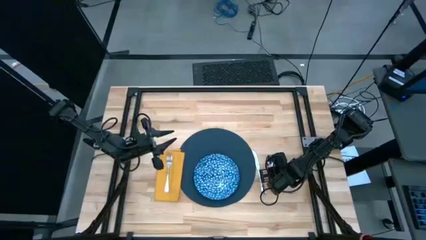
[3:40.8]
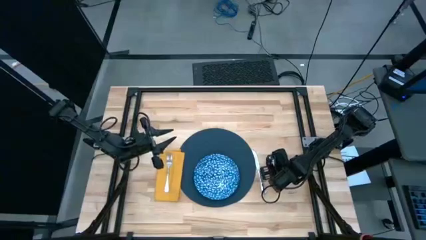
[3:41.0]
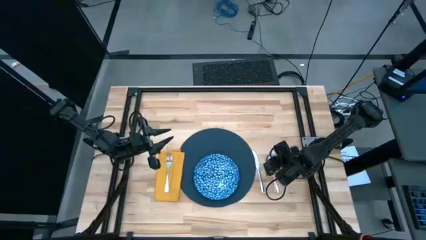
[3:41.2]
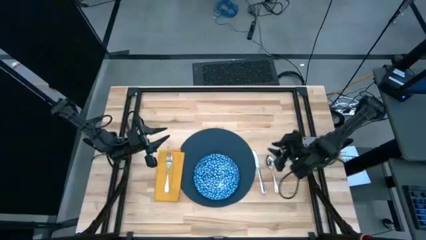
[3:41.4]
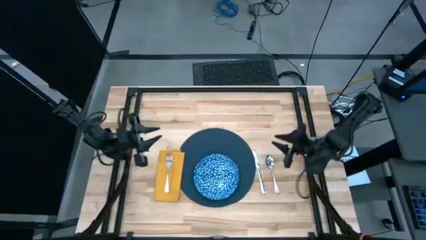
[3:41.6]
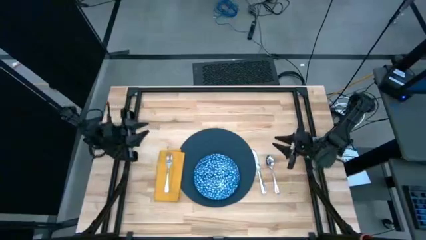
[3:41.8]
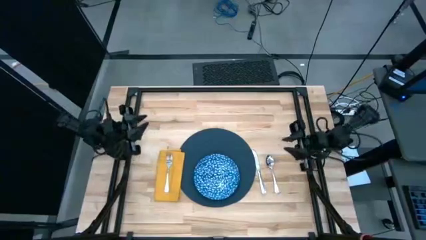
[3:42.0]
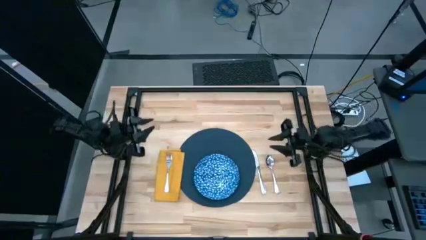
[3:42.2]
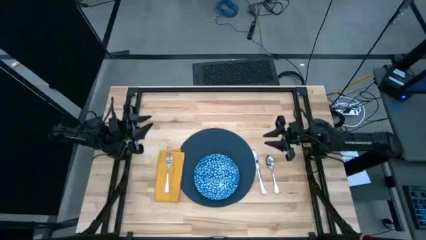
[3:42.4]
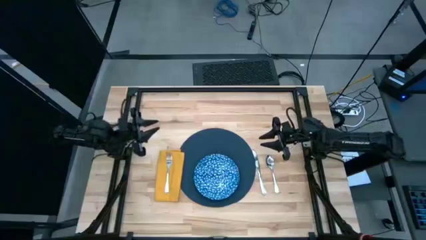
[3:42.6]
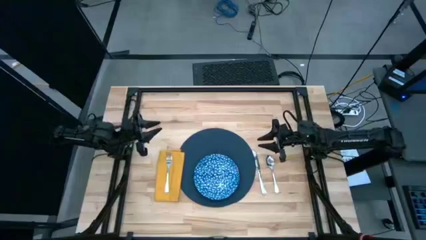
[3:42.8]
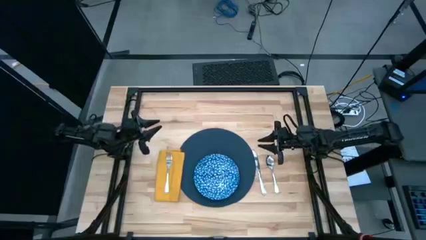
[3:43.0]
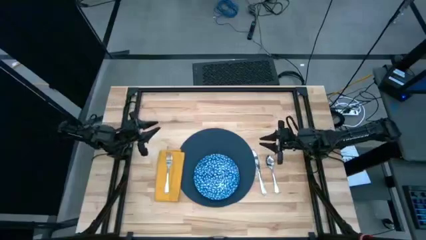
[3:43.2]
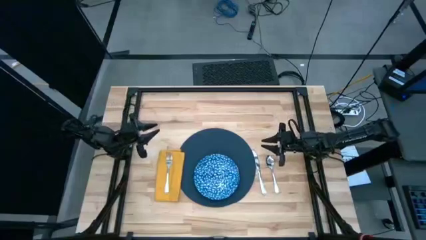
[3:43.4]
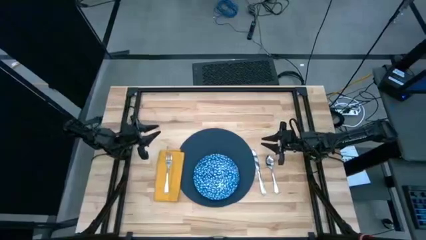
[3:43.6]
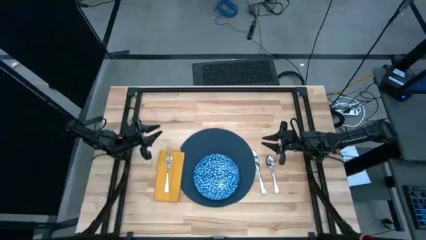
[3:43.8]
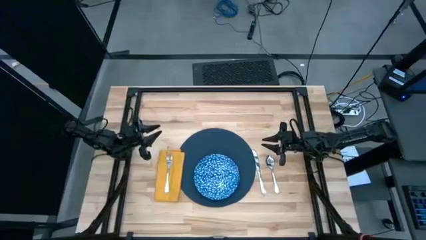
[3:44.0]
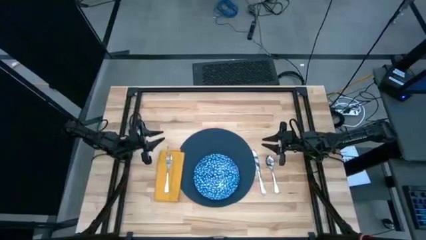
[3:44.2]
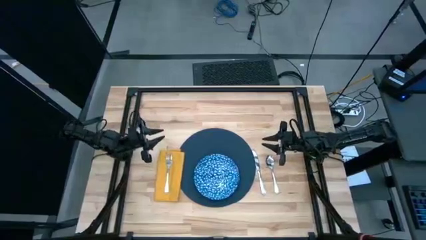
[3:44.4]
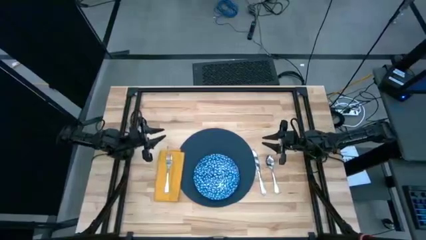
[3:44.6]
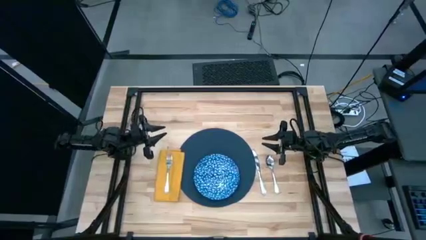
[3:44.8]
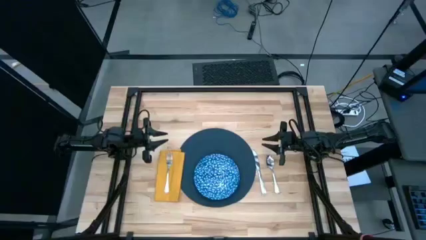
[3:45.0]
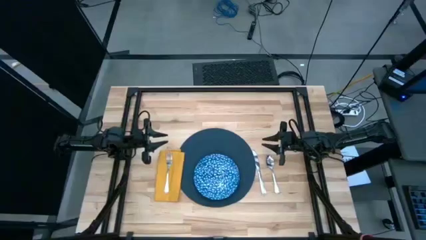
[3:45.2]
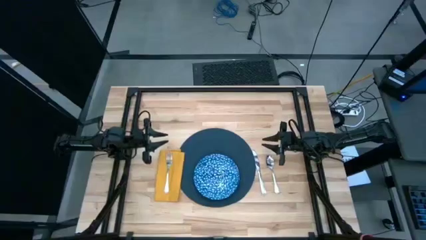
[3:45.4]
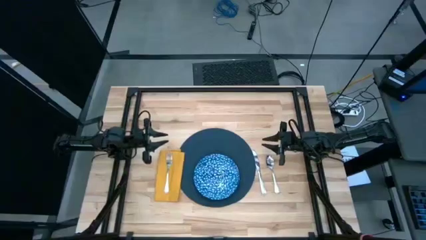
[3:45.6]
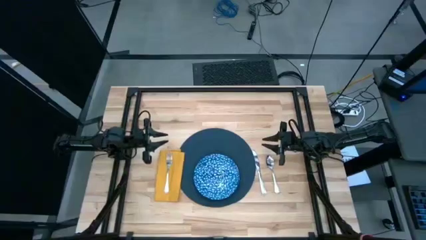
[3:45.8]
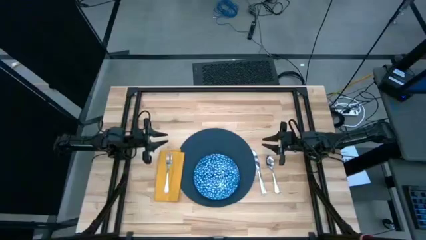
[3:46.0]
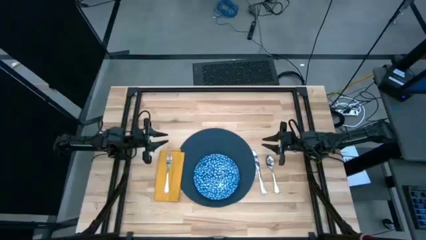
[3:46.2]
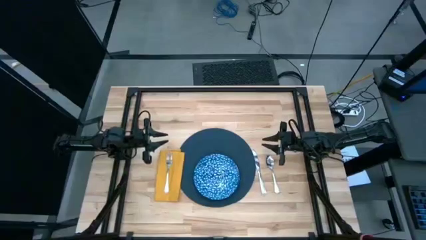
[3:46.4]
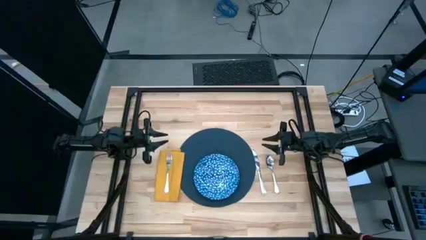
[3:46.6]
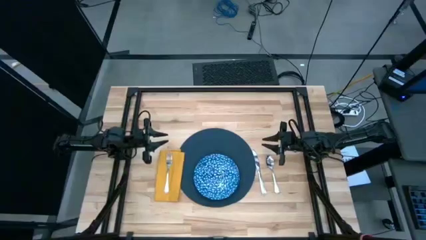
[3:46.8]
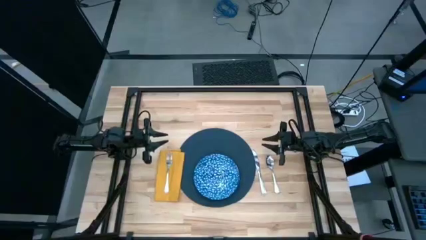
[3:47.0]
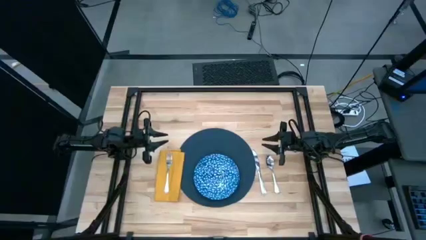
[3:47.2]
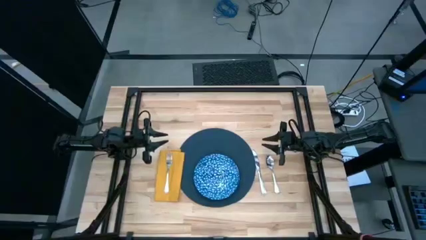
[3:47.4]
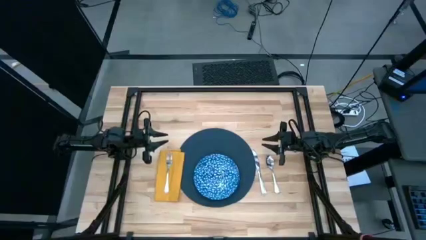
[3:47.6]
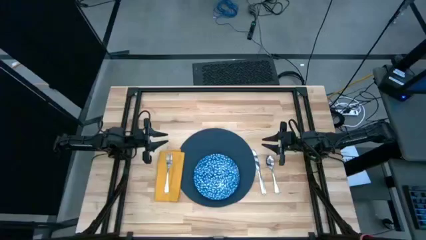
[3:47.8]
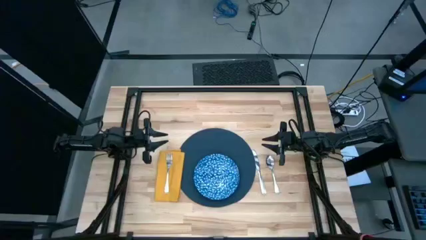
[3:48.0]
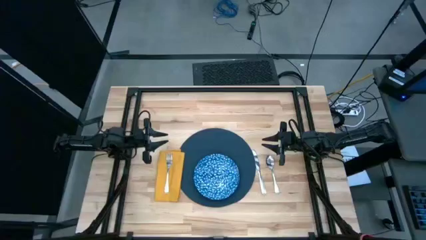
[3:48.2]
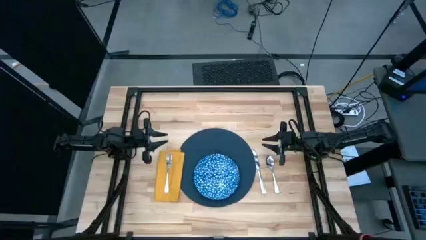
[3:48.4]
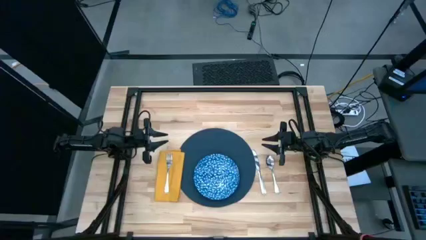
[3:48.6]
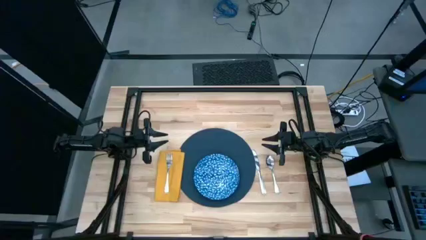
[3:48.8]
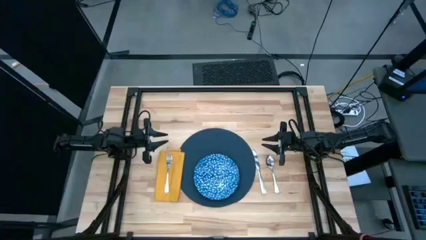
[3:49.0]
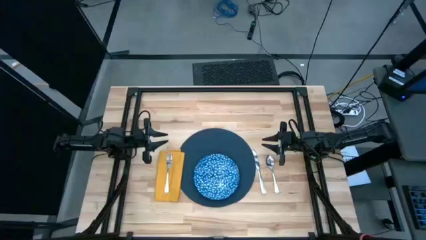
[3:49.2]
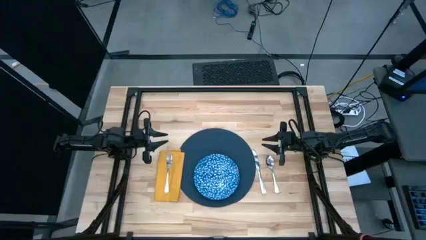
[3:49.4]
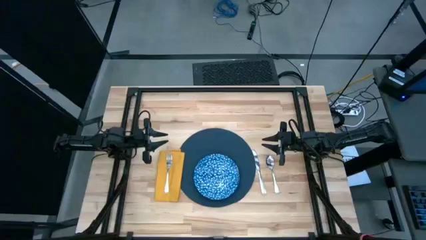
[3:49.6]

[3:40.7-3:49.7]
Task: Set table place
Return to Home Position
